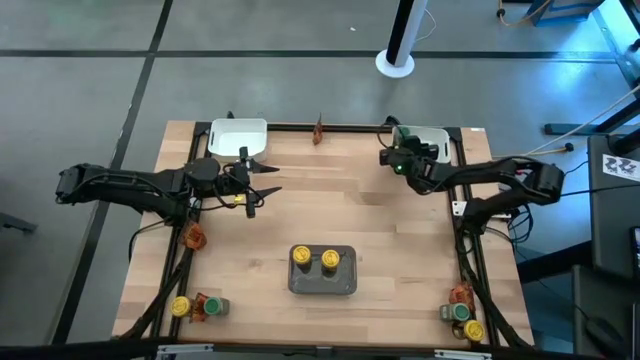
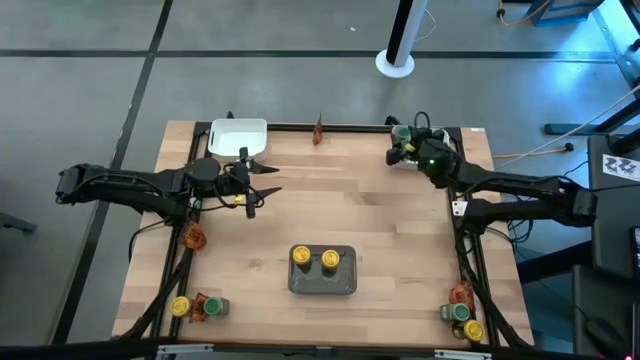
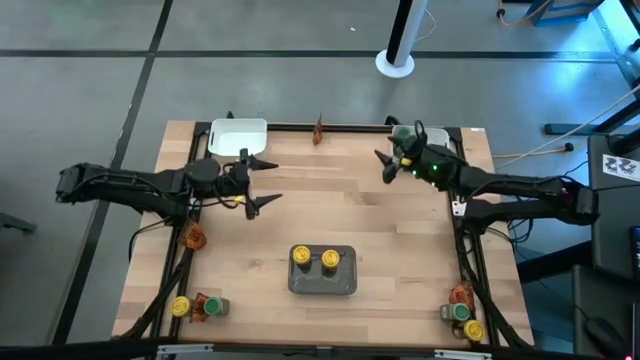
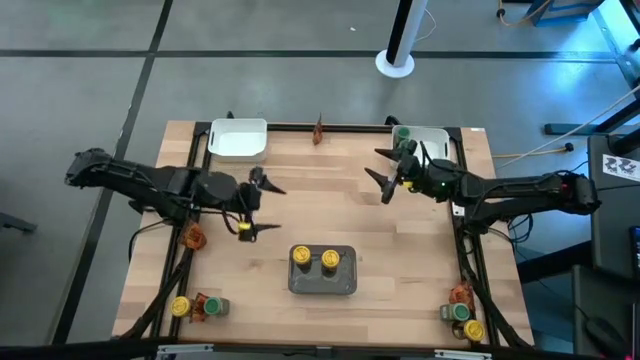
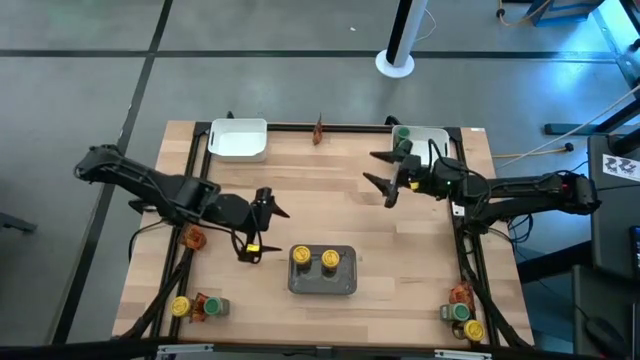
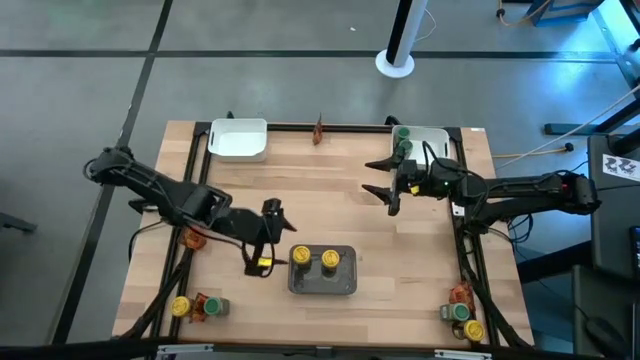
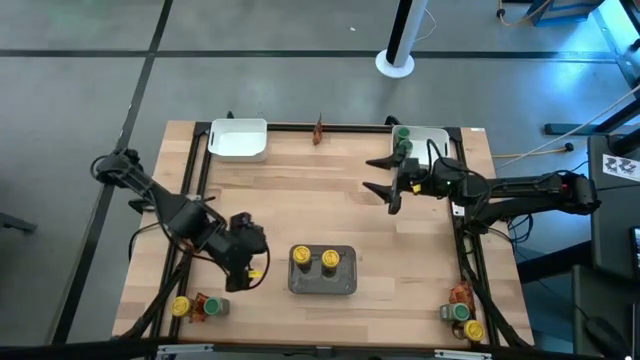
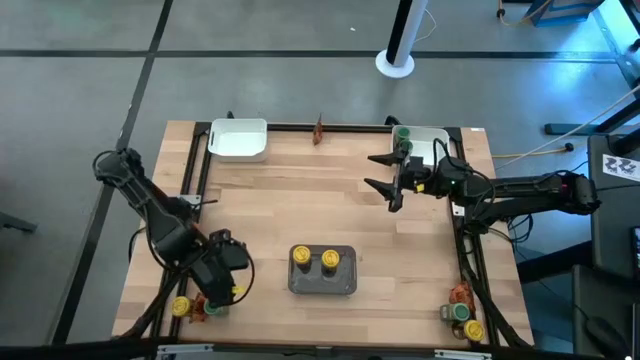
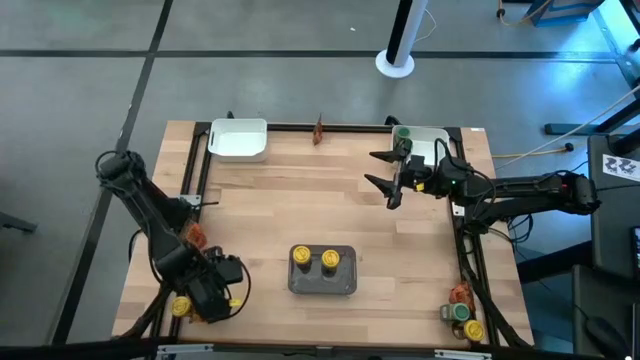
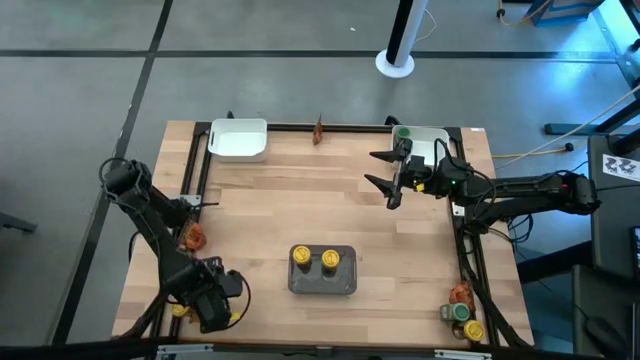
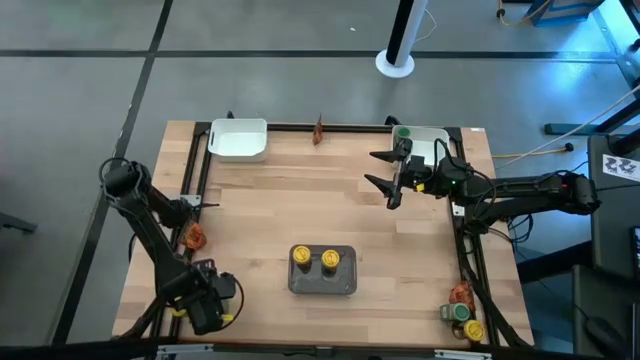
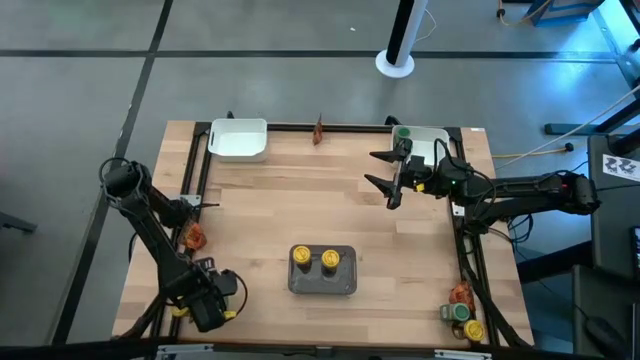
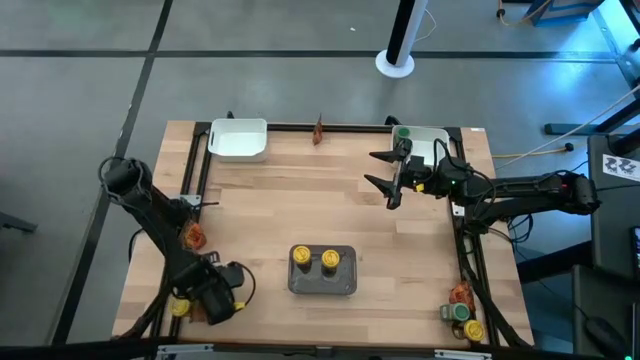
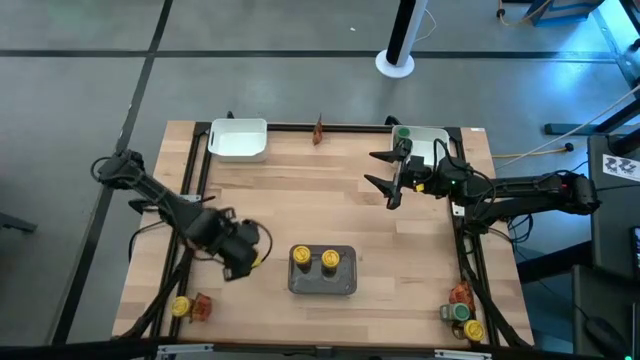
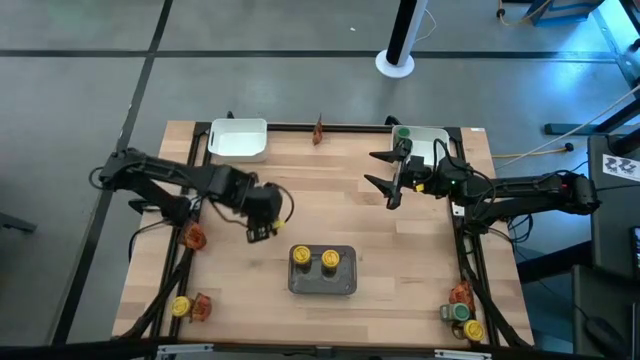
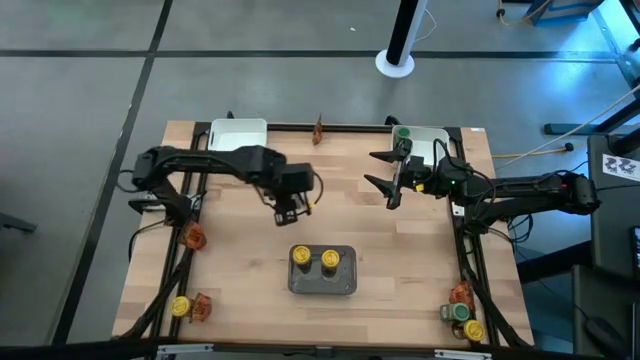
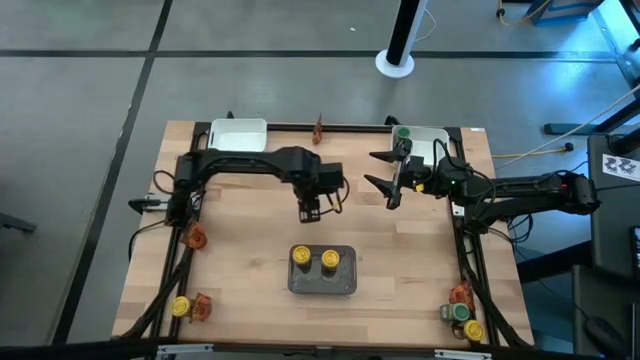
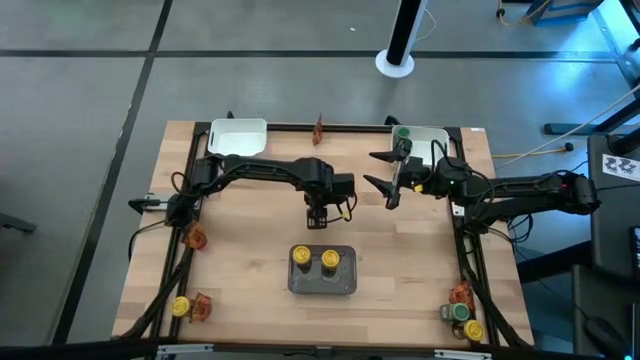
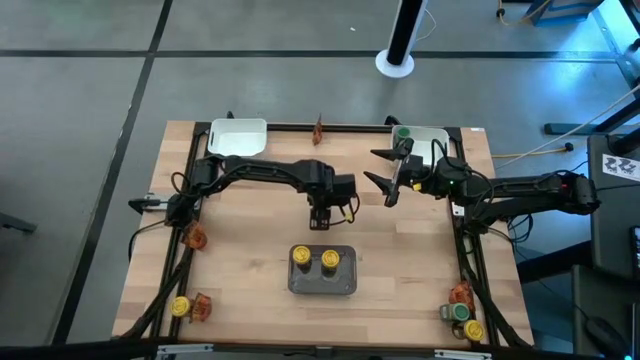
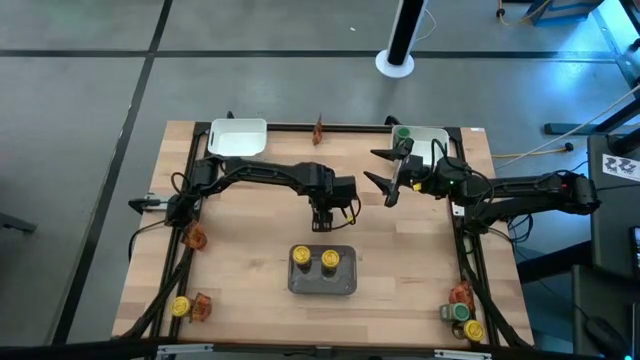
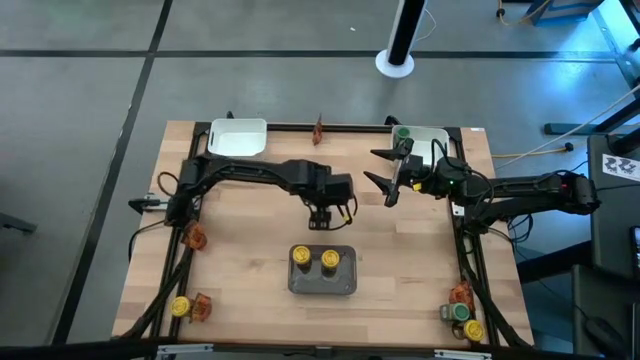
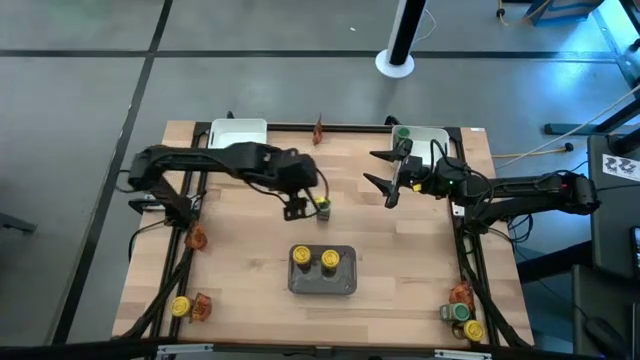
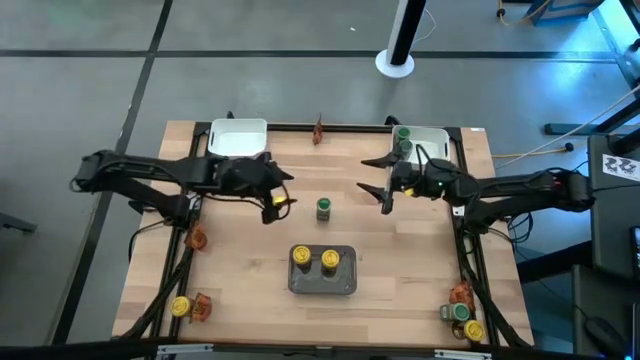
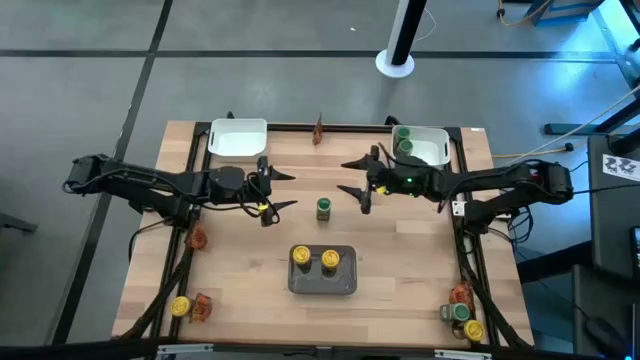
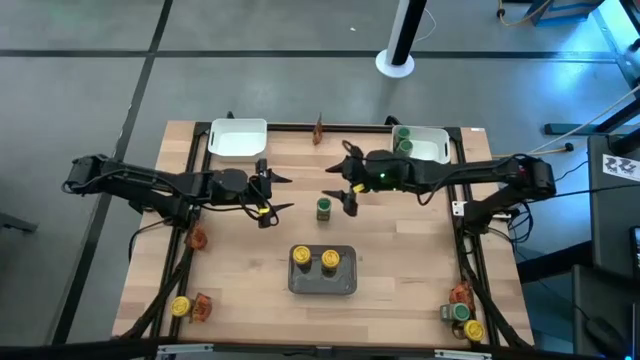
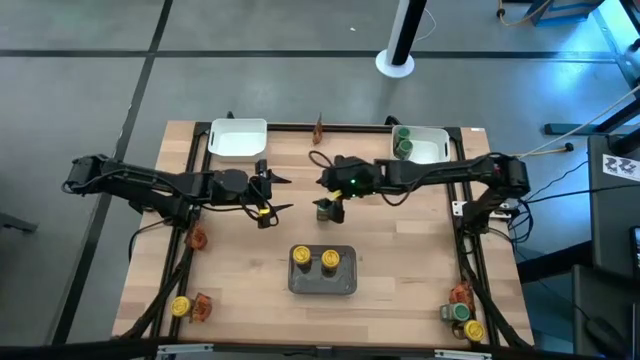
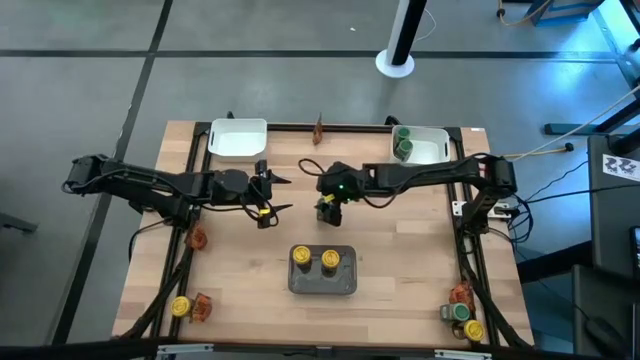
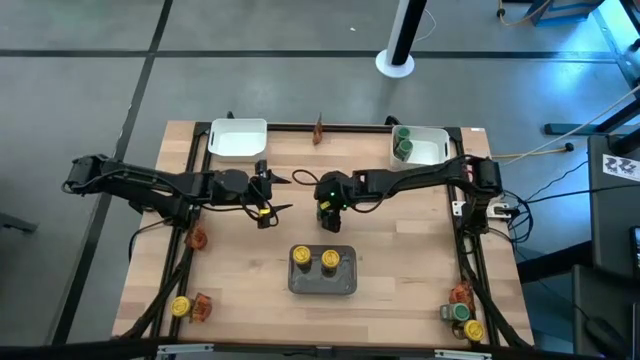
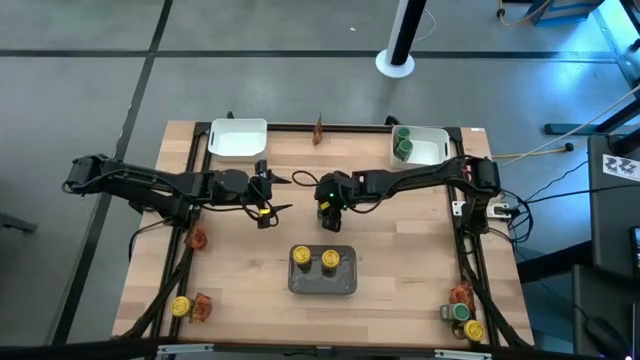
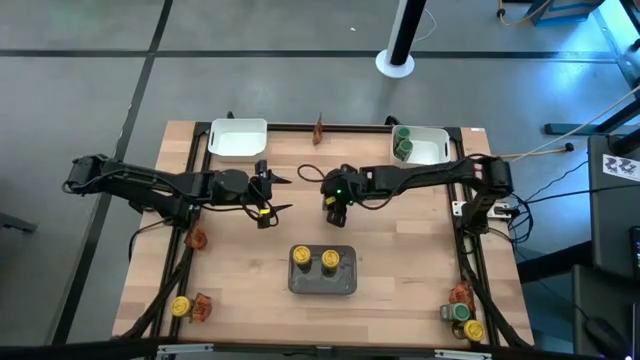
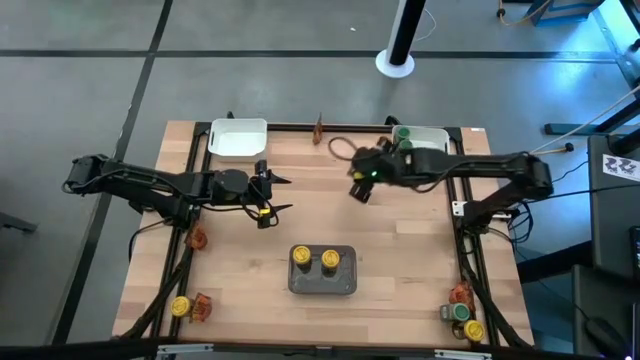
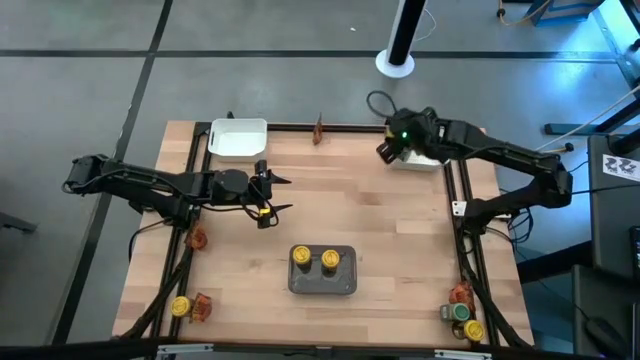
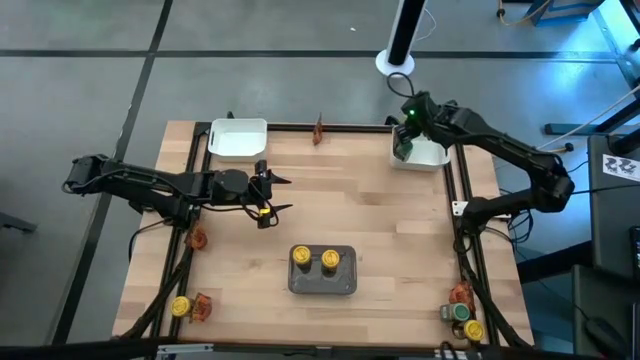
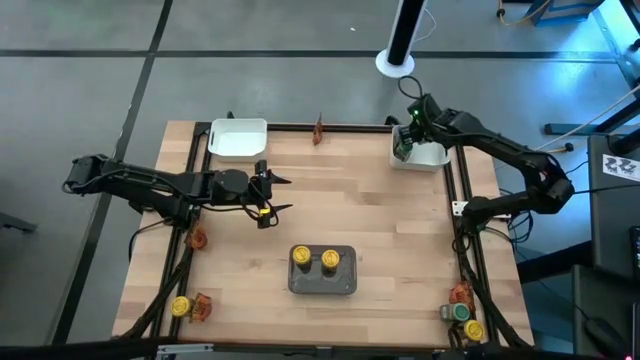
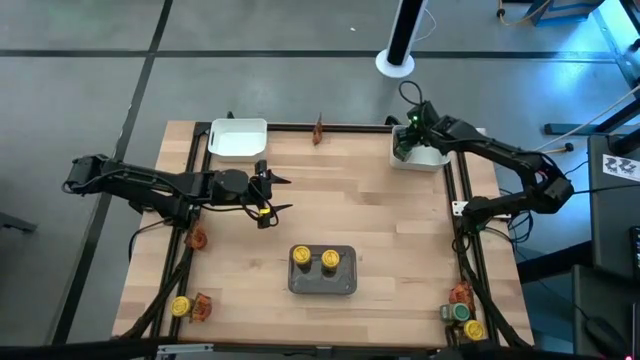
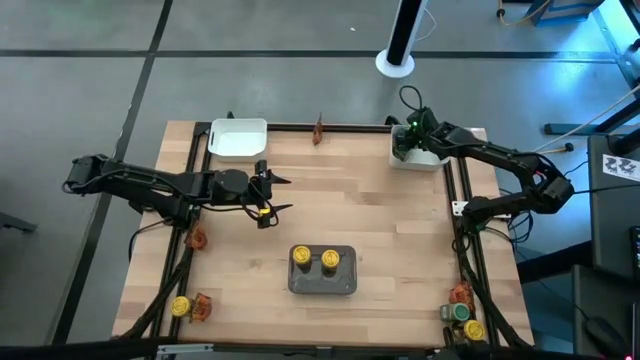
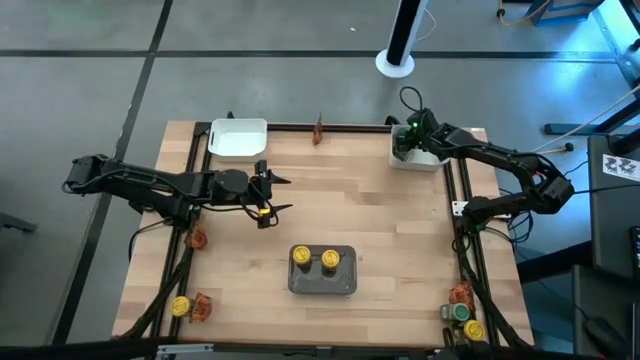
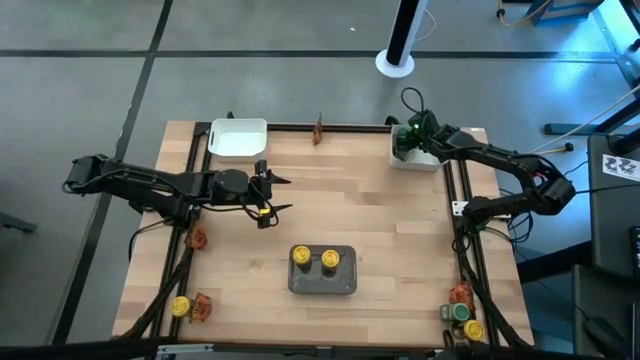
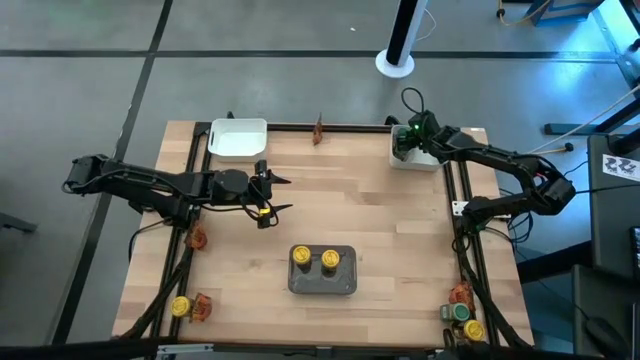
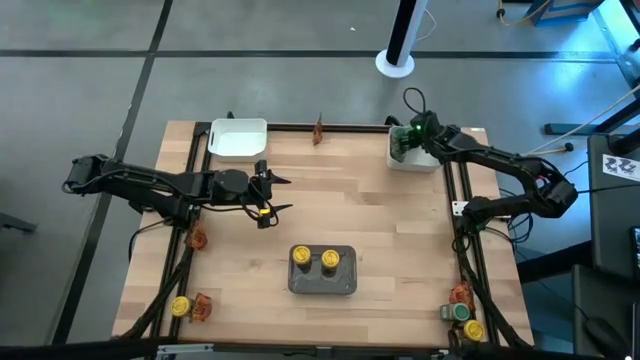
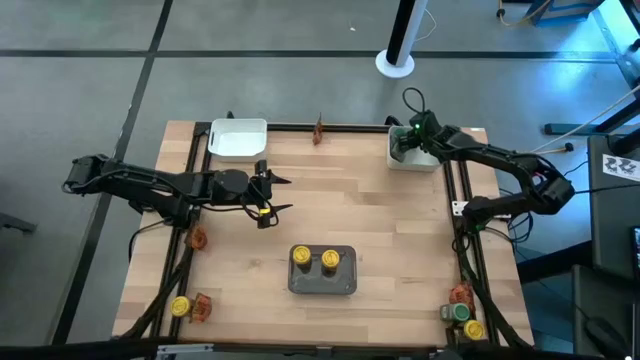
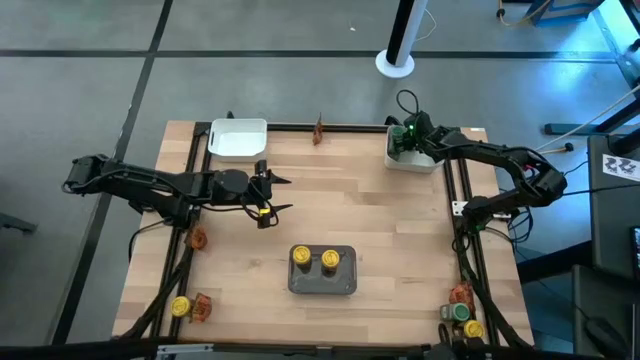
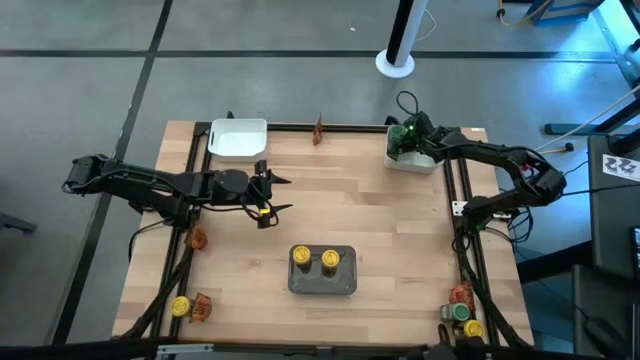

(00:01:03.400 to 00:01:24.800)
Task: Sort spices by type
Put the left green seasoning bottle into the right white bin
